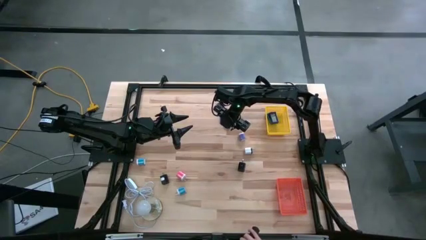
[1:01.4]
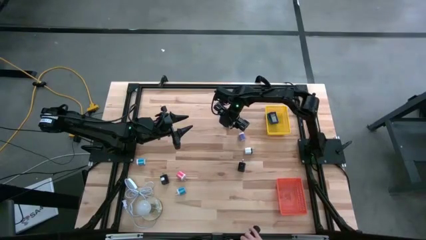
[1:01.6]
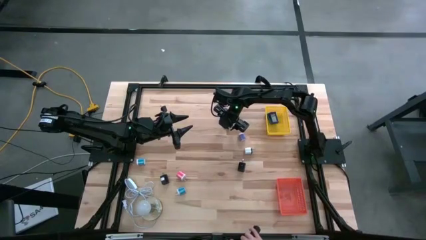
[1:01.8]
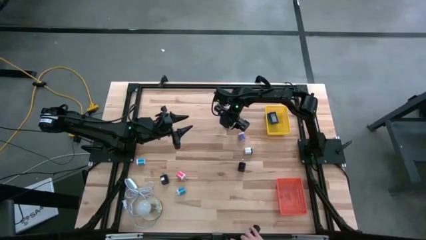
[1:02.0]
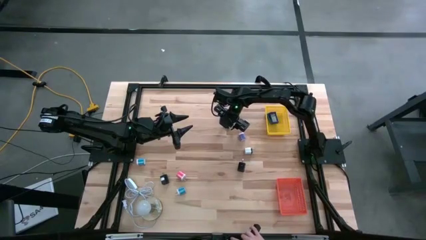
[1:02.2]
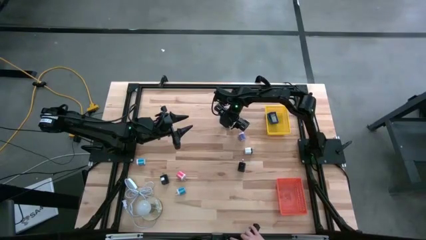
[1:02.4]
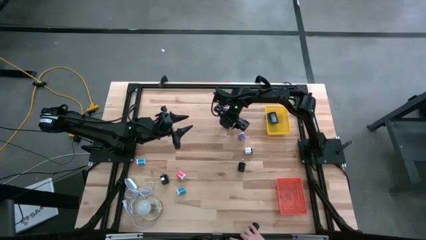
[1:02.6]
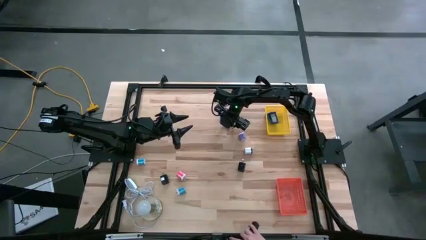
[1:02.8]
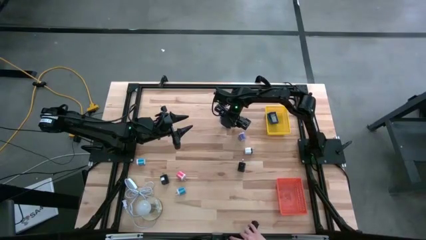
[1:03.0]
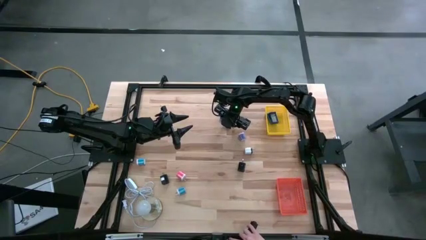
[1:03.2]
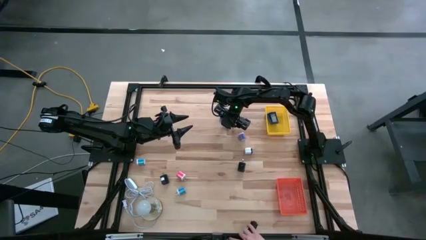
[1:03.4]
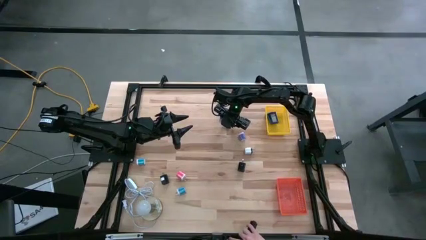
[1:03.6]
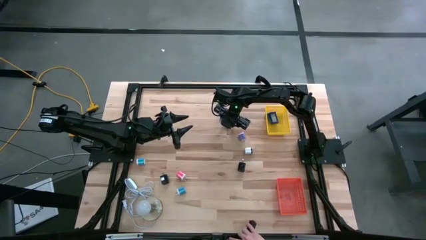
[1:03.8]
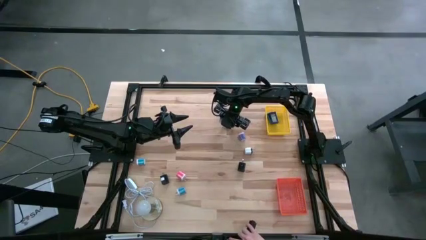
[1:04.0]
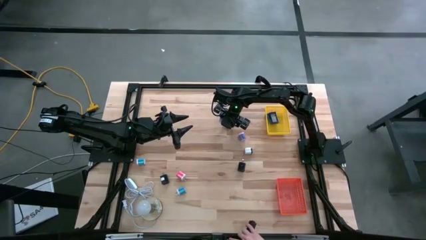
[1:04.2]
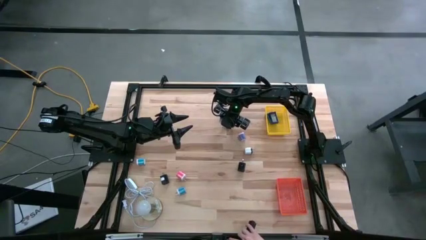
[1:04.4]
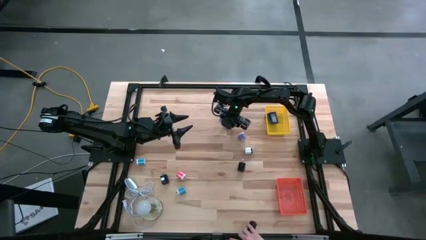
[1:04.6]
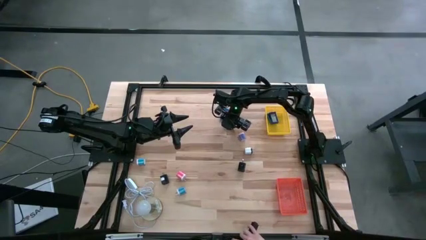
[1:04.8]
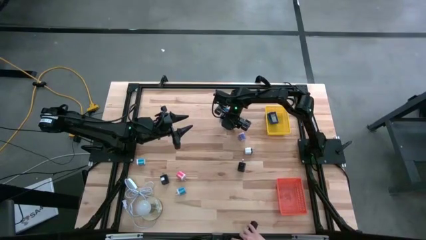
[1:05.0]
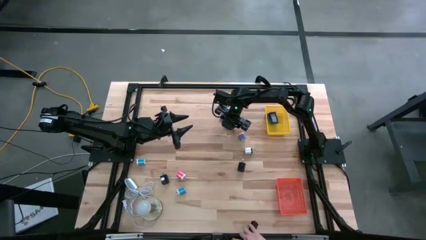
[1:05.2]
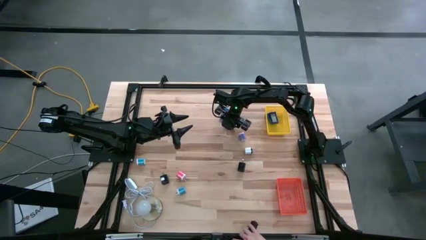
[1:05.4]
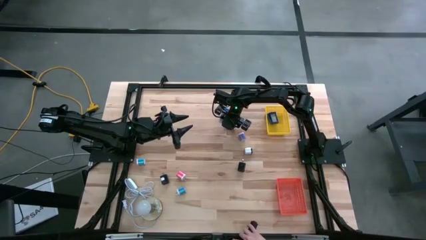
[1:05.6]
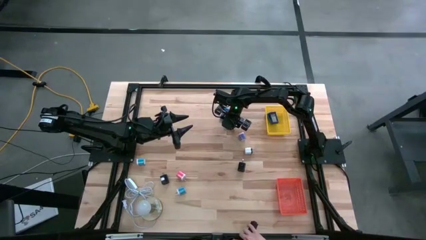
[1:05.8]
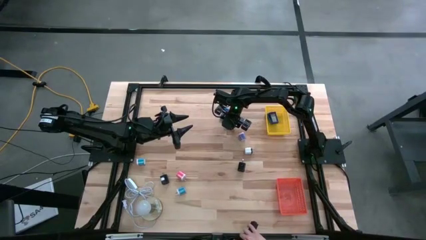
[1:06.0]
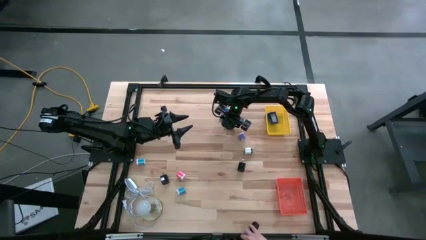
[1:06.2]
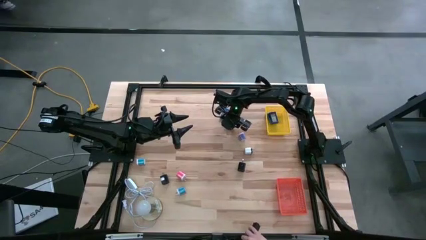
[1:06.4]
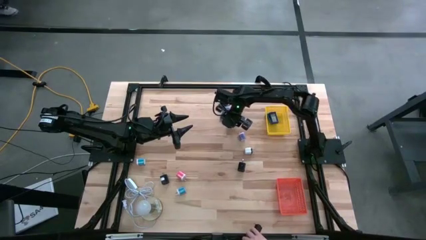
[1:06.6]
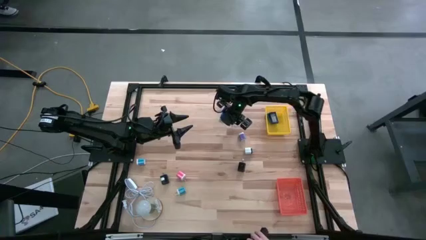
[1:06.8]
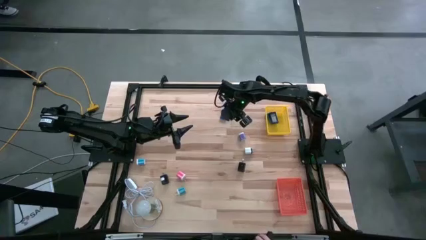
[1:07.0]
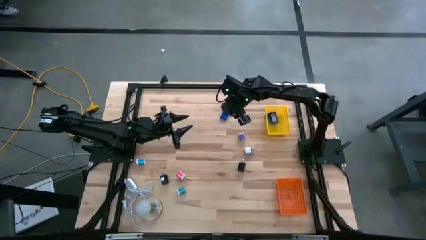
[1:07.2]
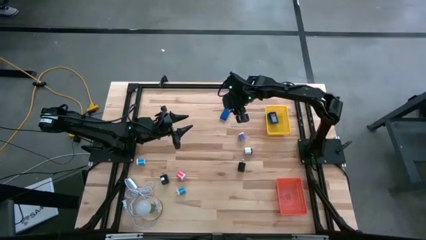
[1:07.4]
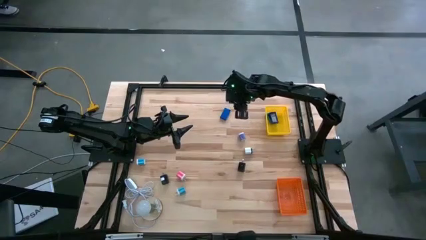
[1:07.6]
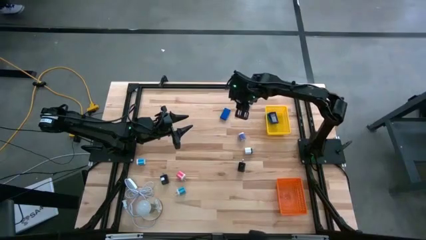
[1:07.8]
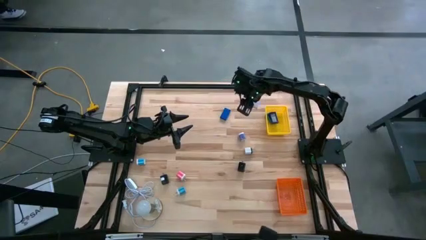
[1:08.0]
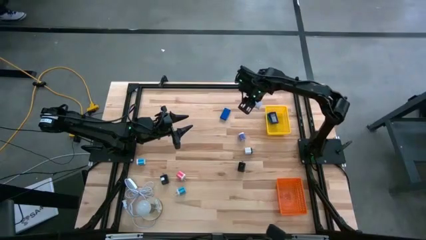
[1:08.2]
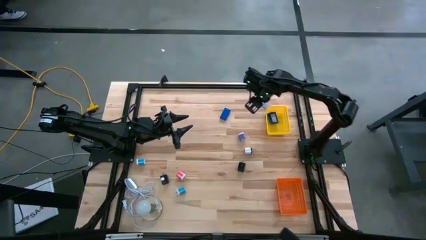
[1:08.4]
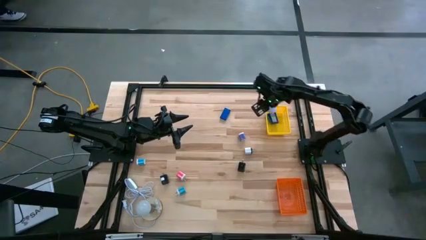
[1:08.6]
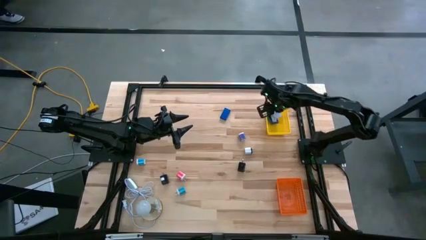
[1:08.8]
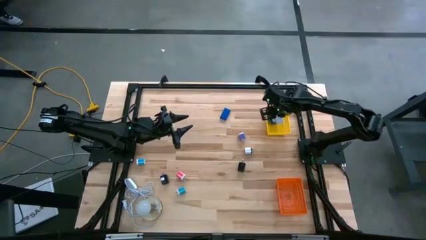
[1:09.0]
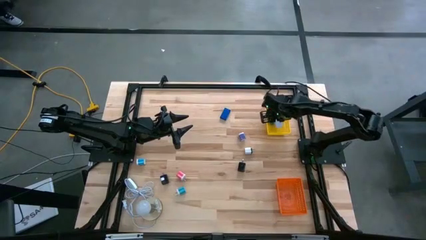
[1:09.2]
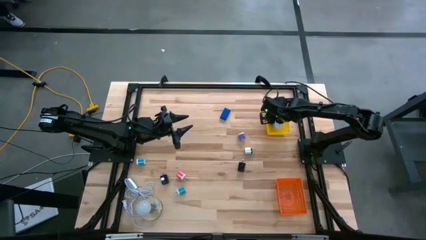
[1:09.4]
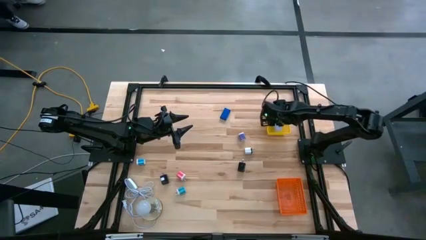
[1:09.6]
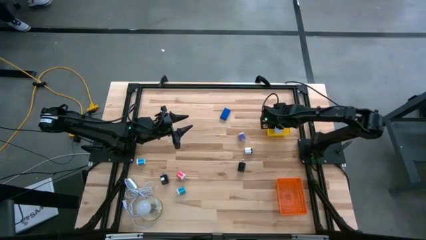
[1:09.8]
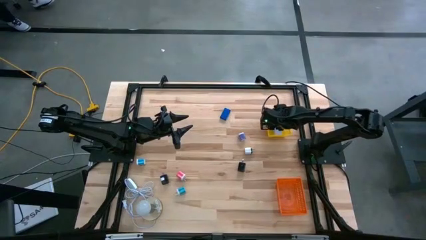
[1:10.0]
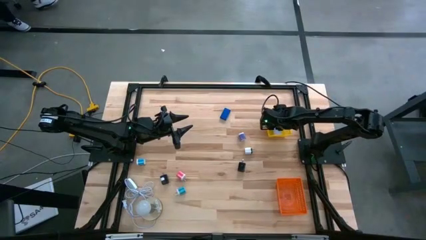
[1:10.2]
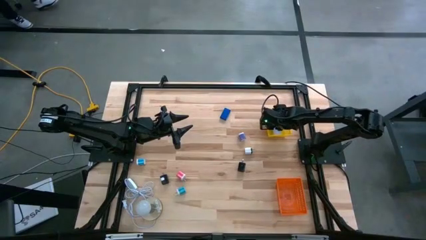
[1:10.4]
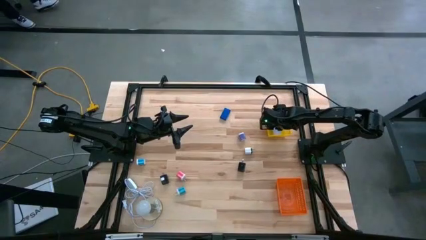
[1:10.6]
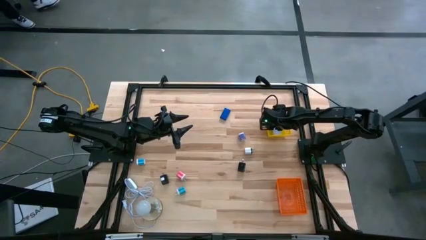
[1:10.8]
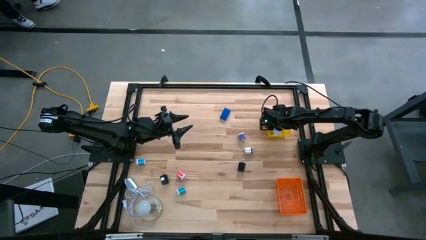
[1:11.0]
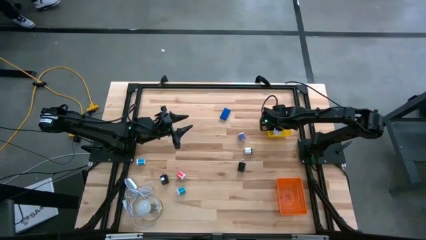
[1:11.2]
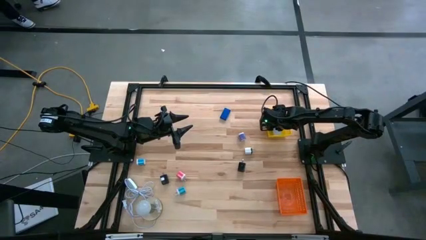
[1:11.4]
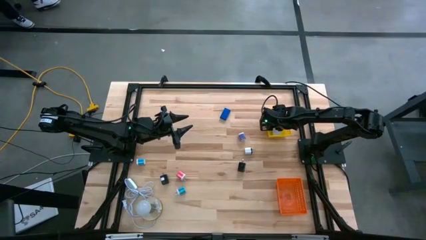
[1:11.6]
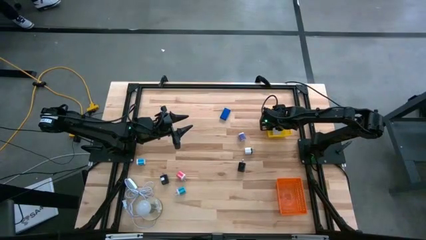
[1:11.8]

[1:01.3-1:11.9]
Task: Pick & Place Office items
Put the white digital clock into the yellow bin

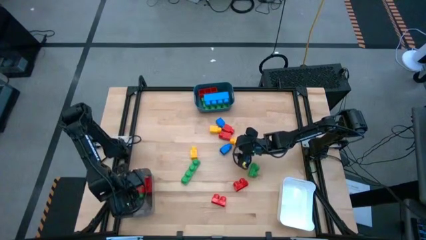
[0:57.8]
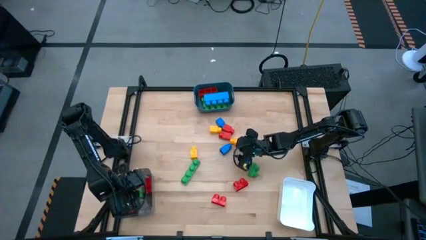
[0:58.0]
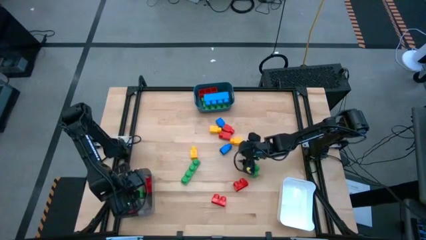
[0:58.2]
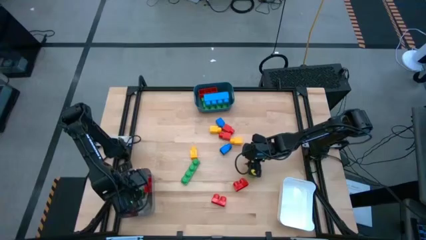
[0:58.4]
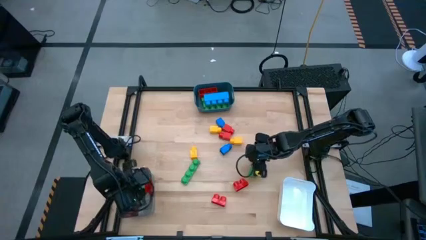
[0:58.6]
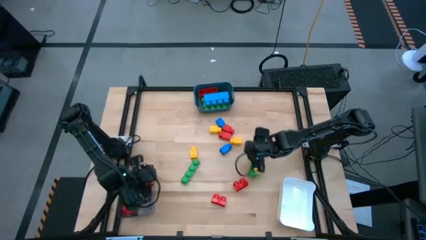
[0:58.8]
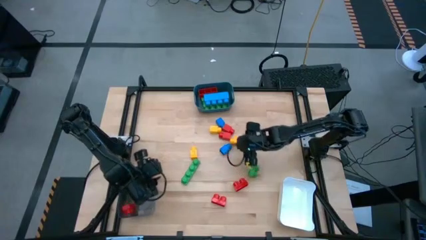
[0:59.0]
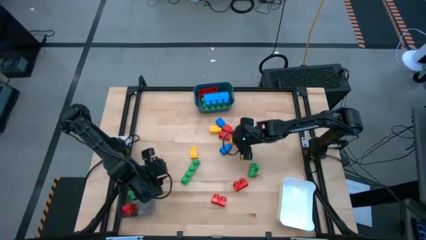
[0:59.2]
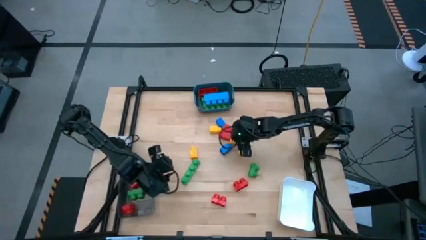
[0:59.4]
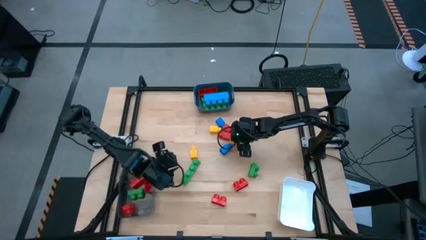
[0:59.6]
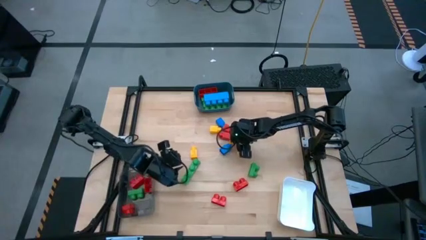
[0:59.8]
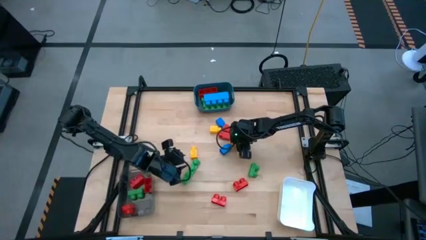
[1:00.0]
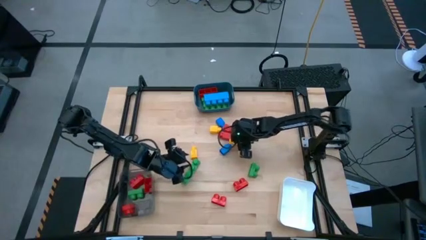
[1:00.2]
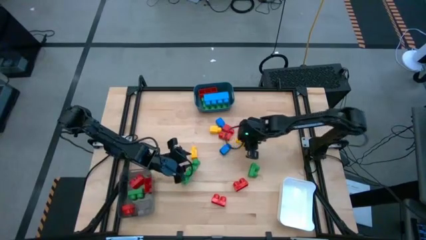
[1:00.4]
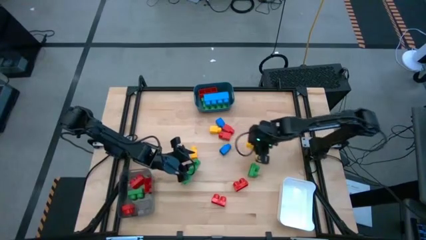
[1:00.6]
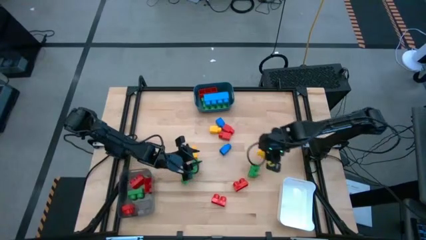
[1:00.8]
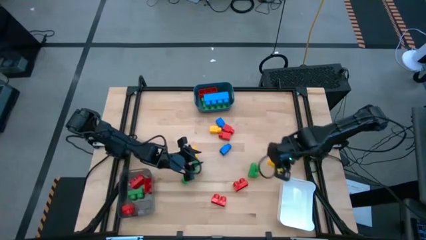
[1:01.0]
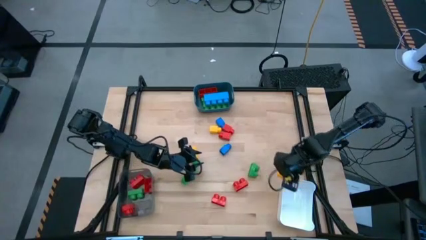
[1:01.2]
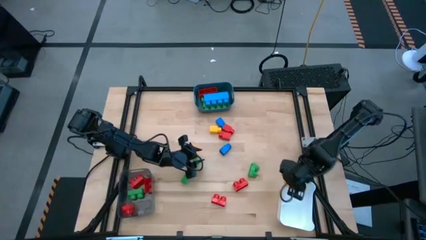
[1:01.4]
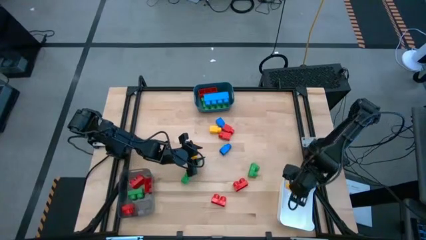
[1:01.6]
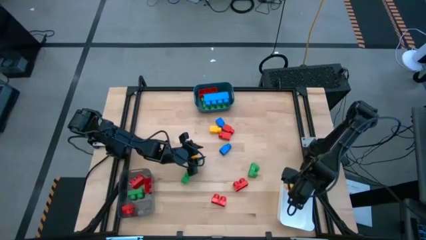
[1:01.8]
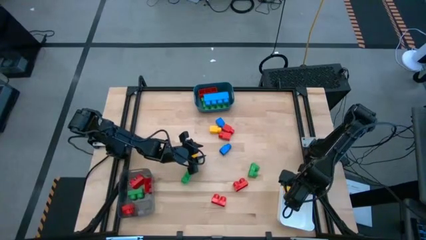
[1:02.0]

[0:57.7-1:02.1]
Task: Sort blocks by size
Put the yellow game piece into the white container

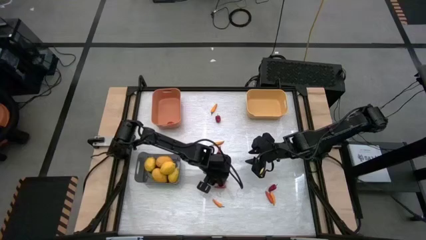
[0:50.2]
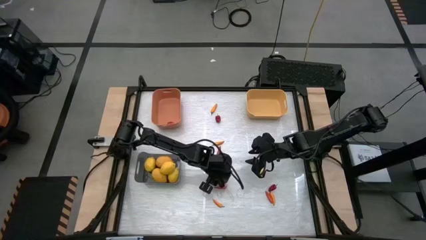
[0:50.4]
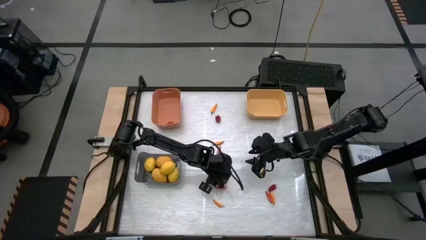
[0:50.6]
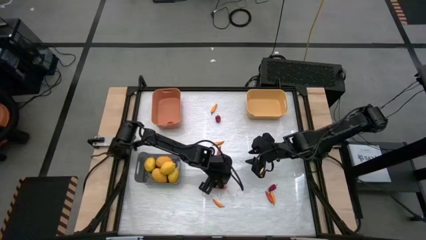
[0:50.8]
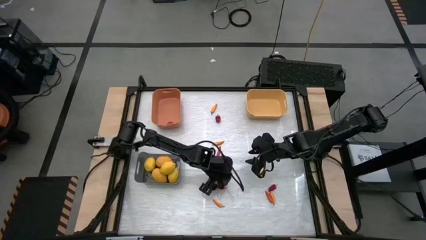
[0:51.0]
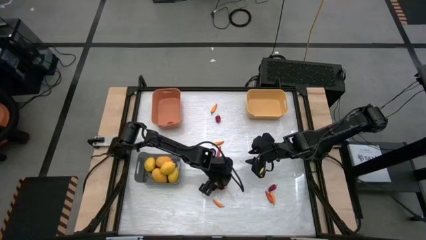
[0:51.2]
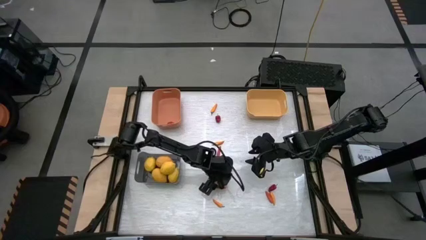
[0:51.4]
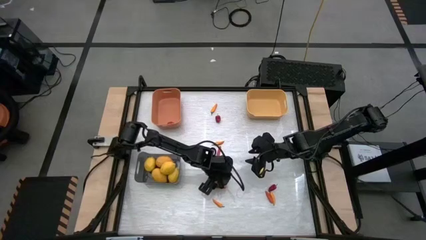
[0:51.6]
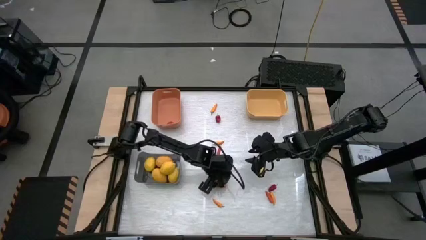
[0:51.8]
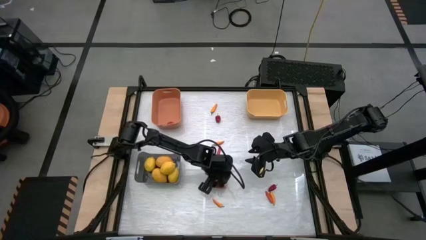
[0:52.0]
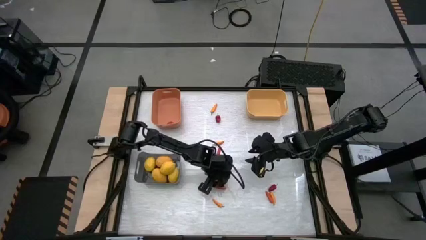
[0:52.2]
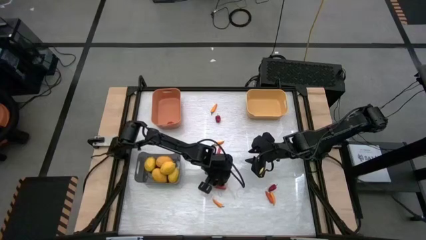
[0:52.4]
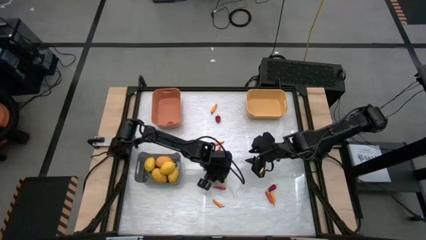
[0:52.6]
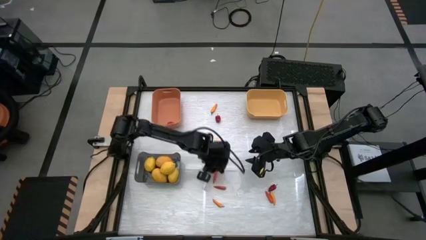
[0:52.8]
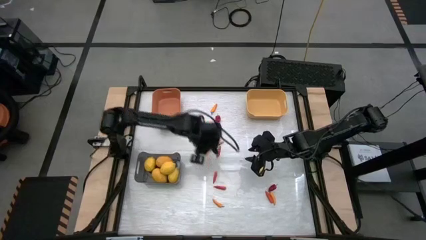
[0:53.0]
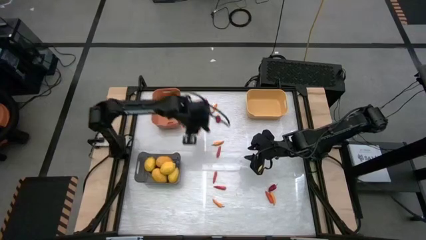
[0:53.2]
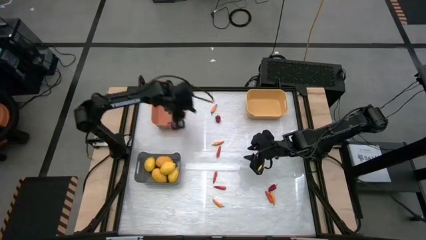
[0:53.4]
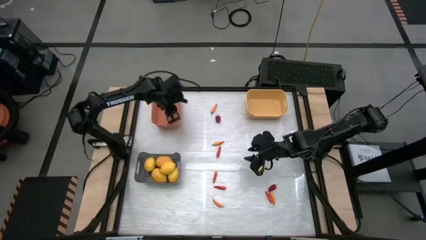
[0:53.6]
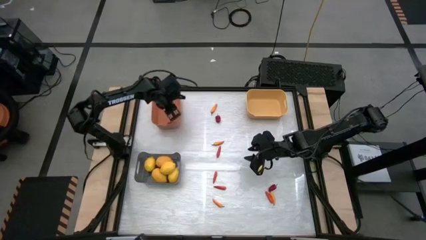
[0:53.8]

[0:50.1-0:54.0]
Task: Sort produce into baskets
Put the red bell pepper into the orange bin
